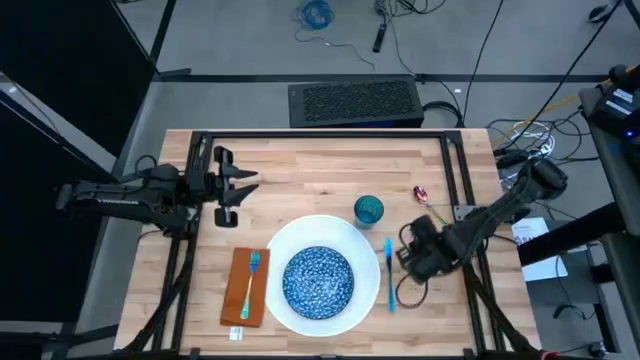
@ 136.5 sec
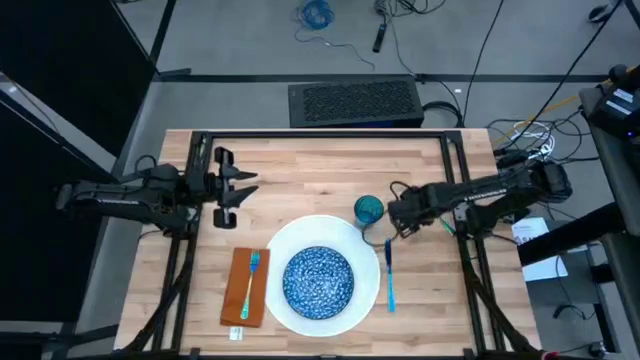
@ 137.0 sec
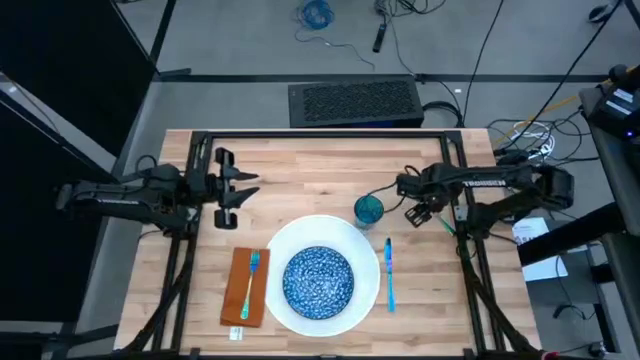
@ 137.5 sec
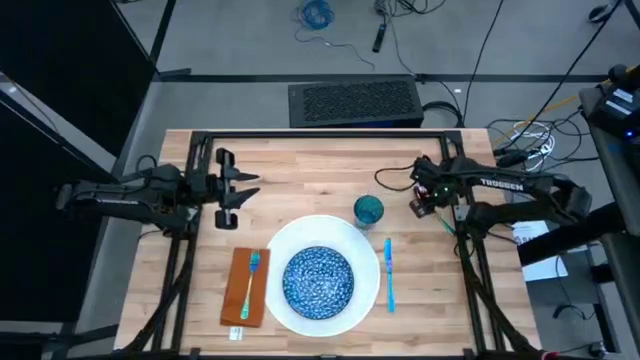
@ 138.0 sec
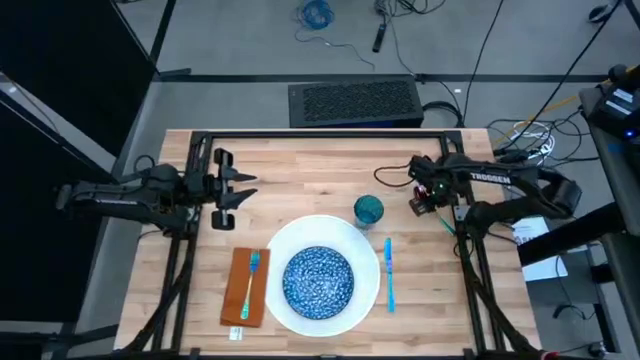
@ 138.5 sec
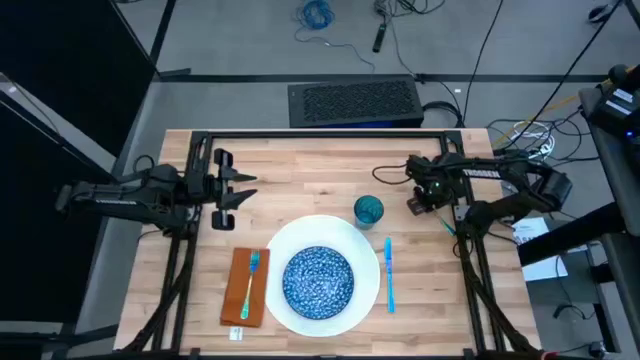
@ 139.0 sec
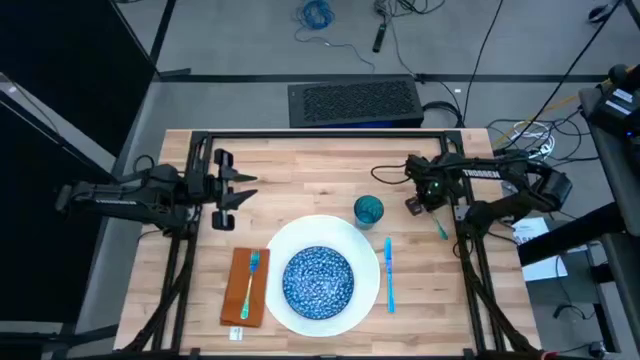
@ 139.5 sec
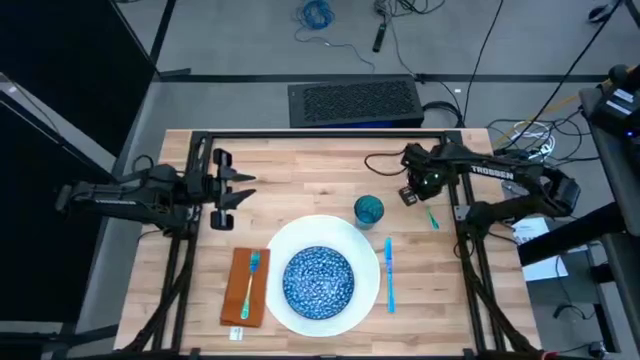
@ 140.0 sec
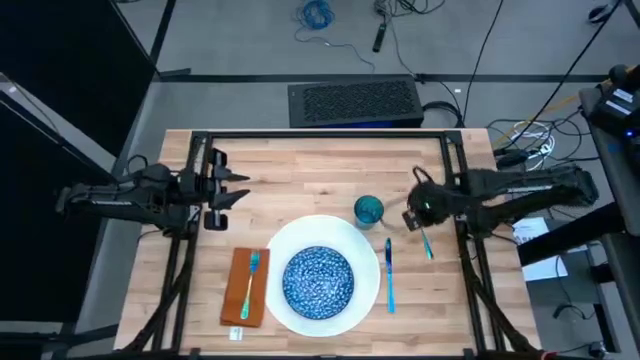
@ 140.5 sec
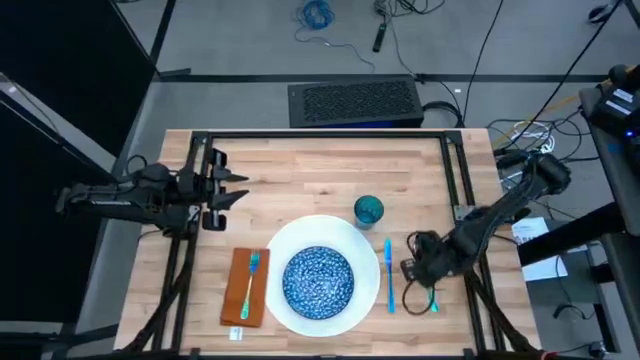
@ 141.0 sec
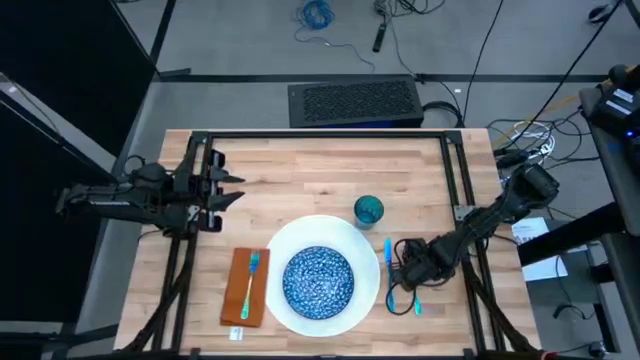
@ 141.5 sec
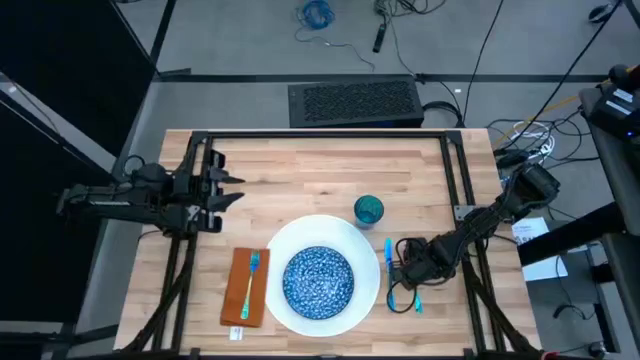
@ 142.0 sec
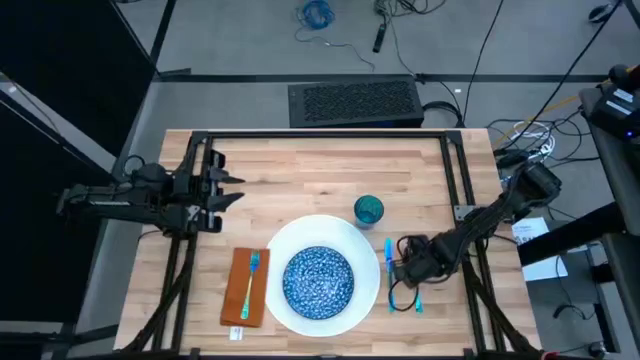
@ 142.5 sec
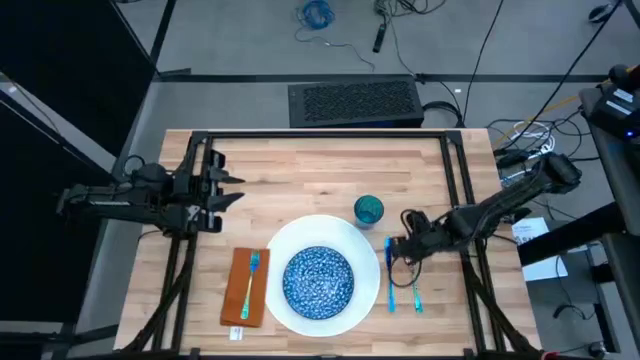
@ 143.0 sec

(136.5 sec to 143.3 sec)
Task: Set table place
Move the blue spoon to the right of the blue knife

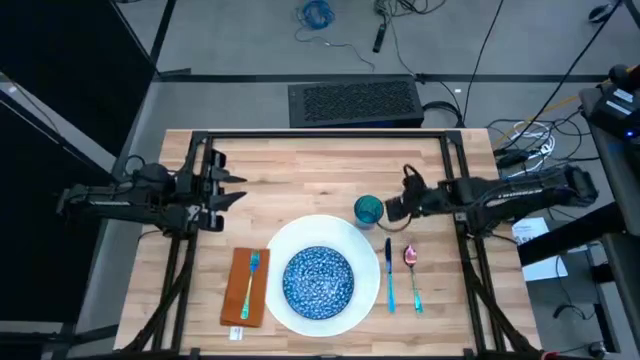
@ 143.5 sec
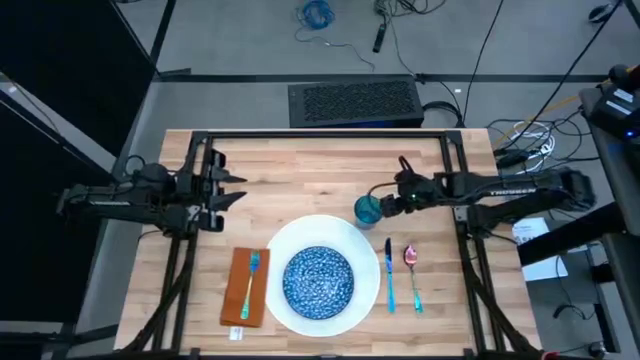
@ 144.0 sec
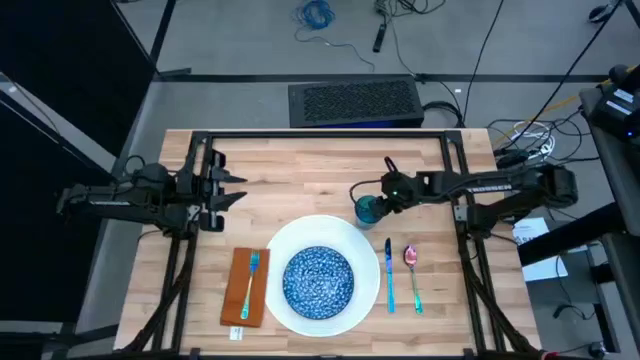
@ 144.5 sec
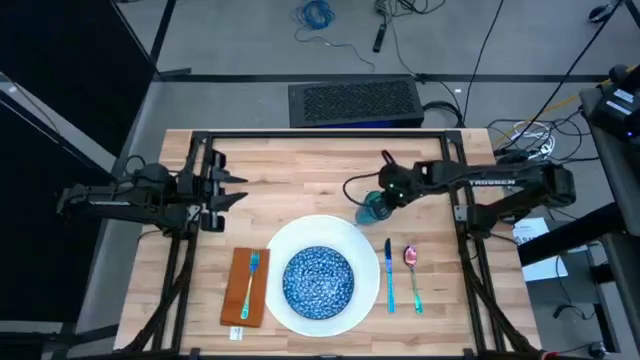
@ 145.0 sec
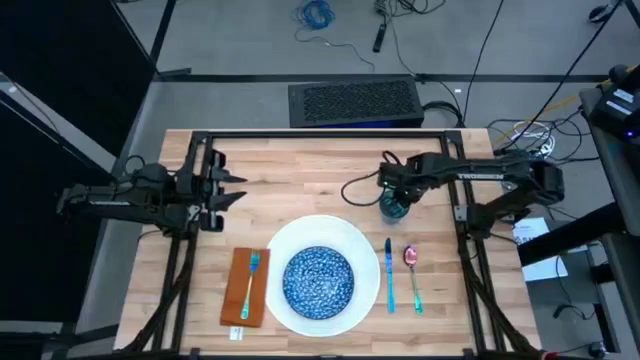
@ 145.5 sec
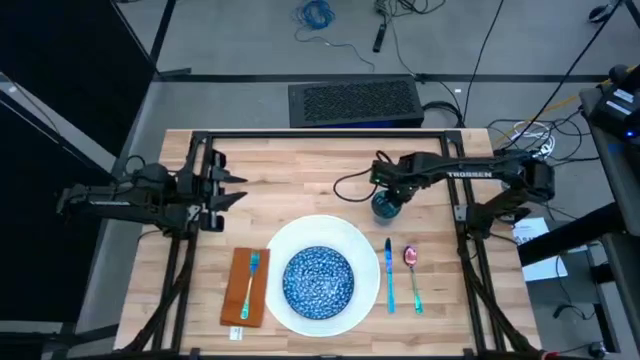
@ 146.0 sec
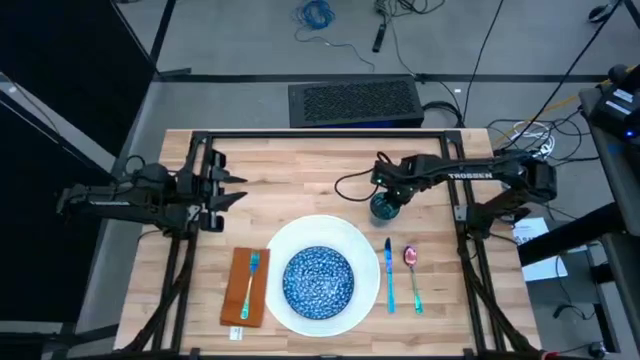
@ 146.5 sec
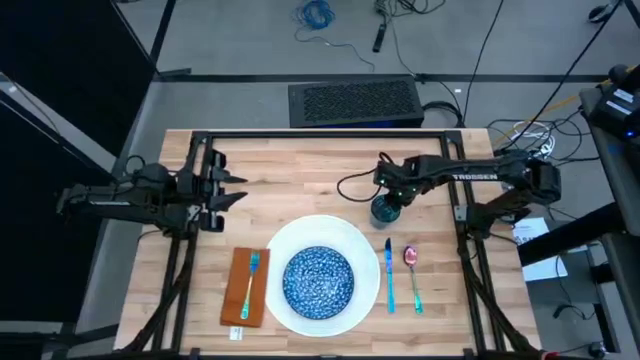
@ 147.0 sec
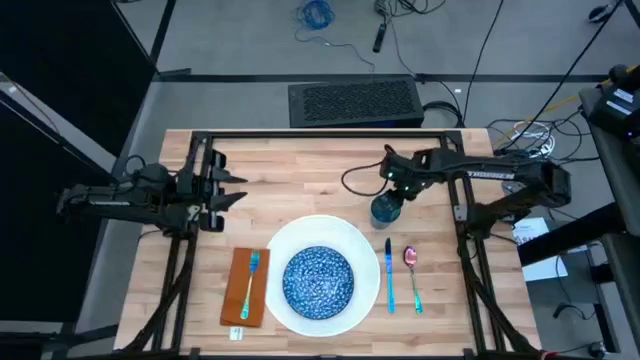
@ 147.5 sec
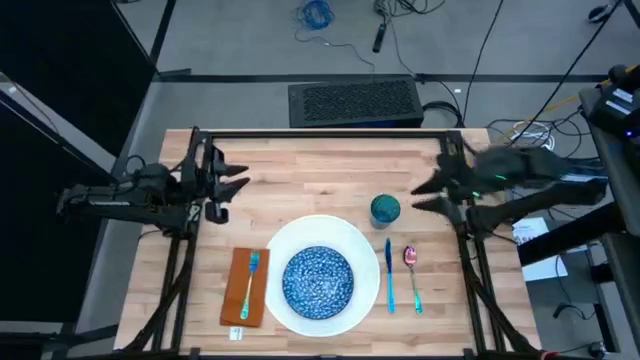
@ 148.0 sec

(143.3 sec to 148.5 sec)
Adjust the blue glass

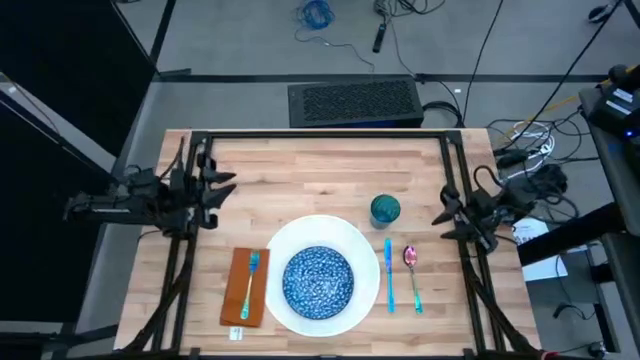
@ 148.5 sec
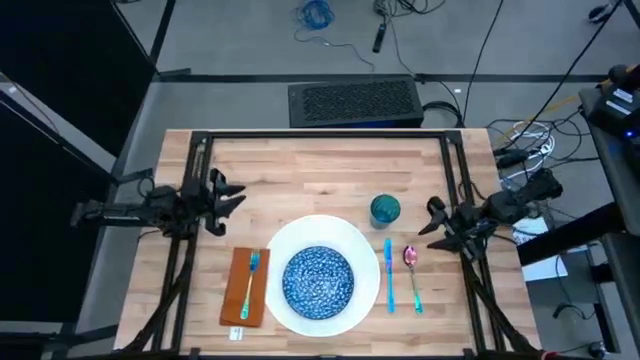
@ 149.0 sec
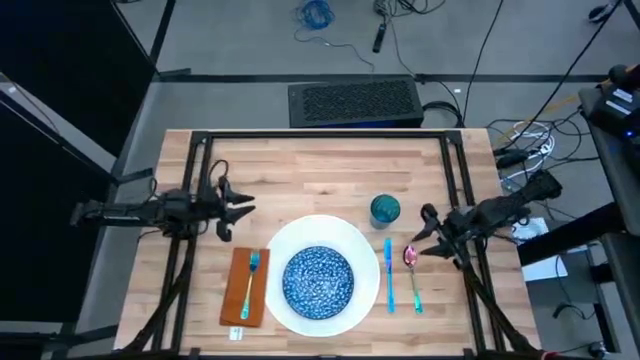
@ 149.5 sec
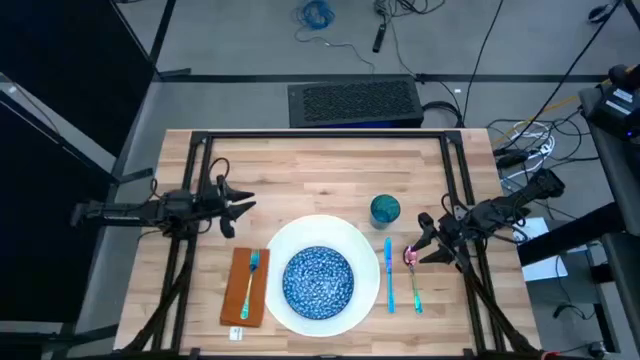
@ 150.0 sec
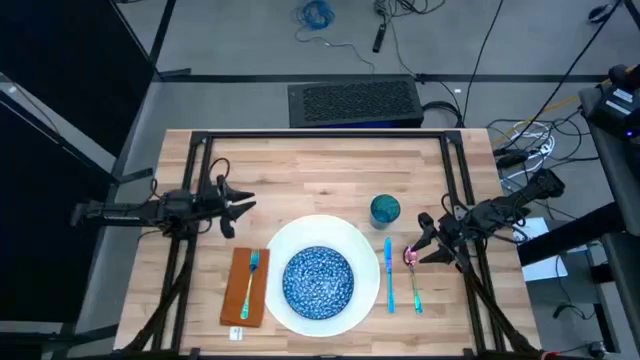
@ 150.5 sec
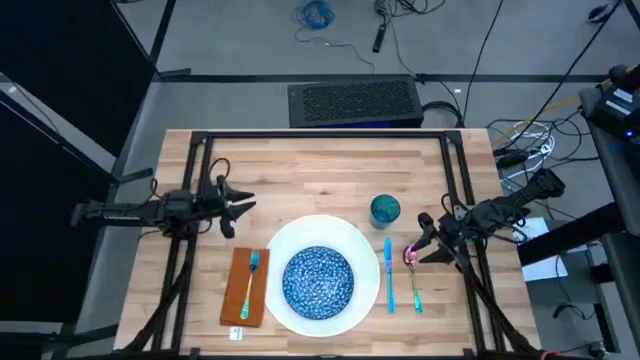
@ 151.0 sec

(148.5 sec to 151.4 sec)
Return to Home Position

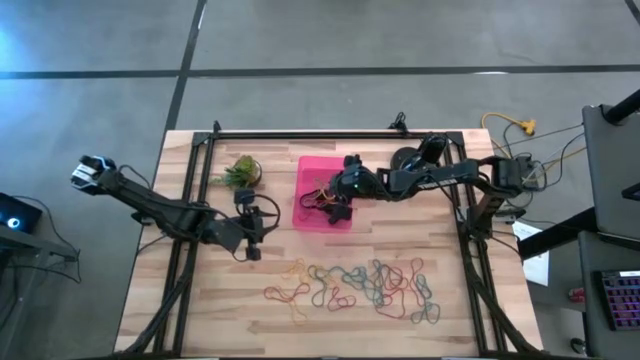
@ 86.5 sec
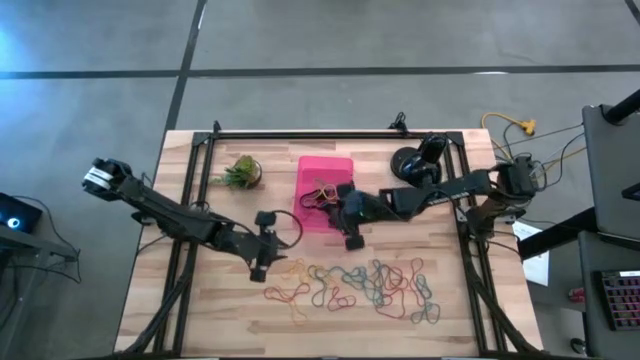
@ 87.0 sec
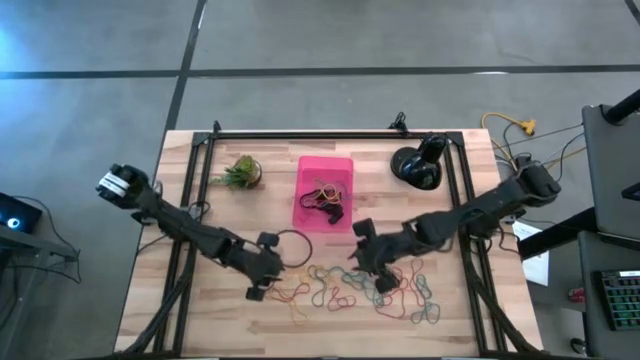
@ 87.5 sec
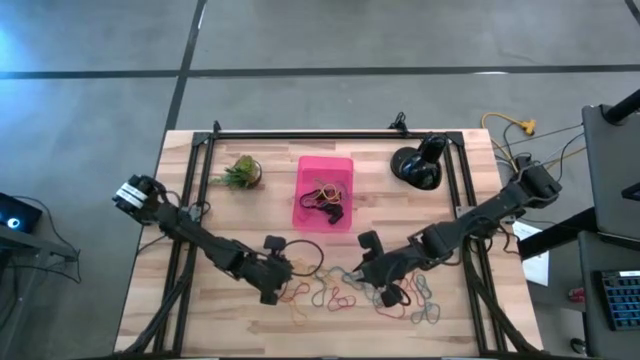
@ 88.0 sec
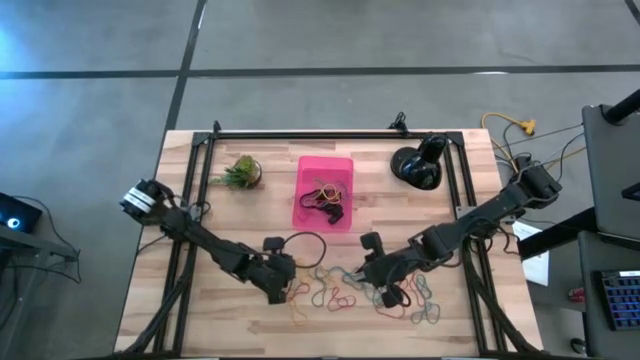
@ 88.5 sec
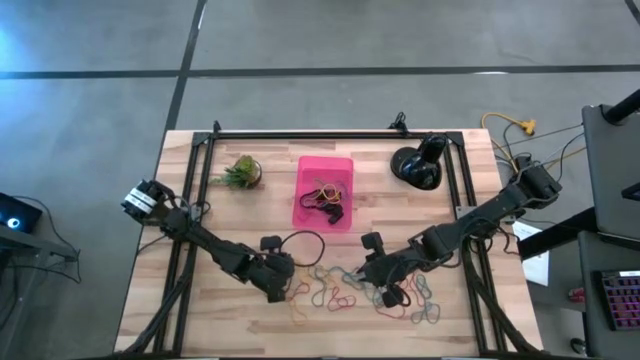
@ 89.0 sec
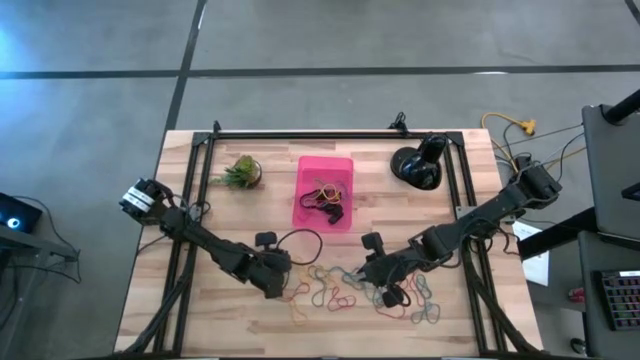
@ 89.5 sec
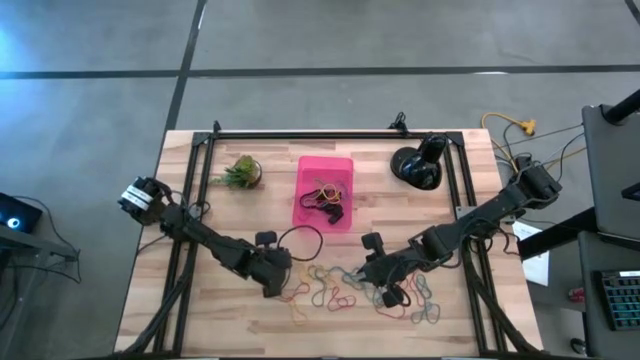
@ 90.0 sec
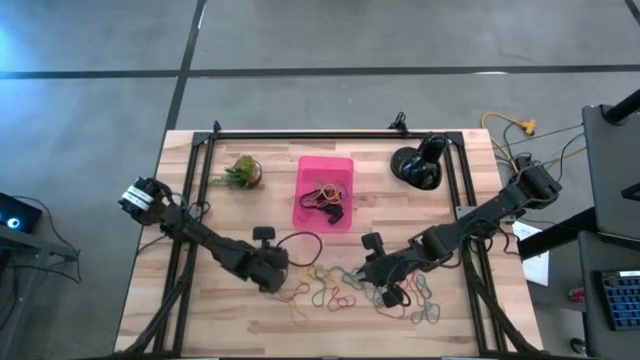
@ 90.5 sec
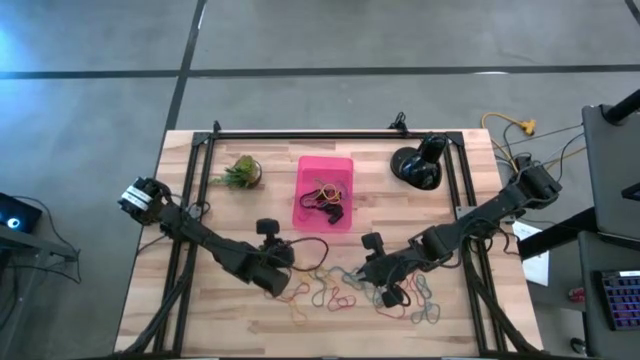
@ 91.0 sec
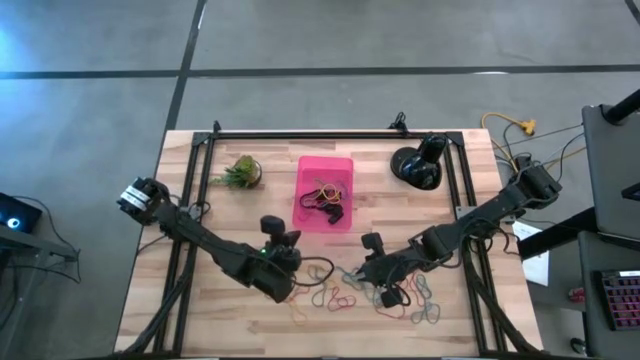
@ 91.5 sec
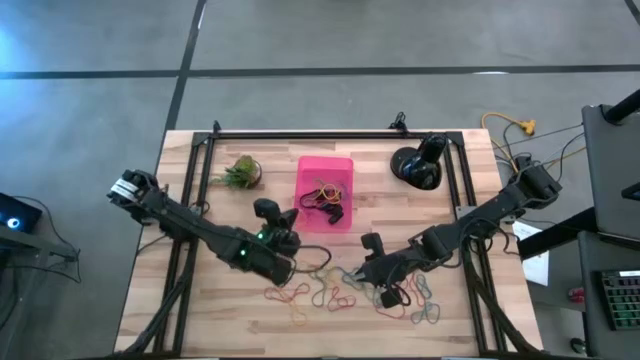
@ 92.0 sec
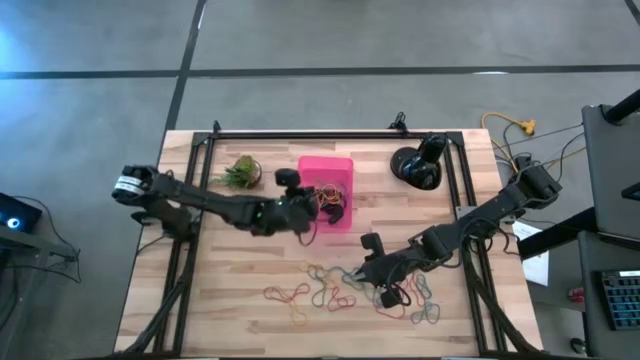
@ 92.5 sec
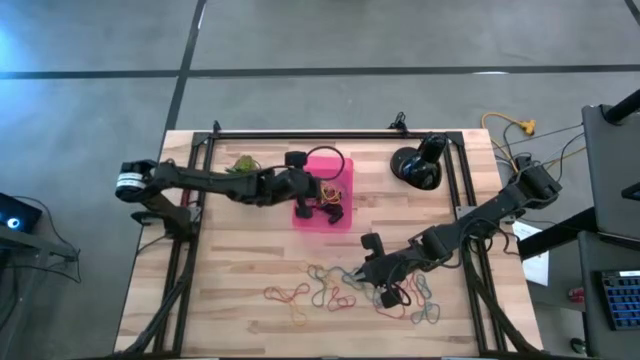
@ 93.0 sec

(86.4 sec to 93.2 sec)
Task: Pick and place rubber bands into bin
Put the yellow rubber bands into the pink bin
